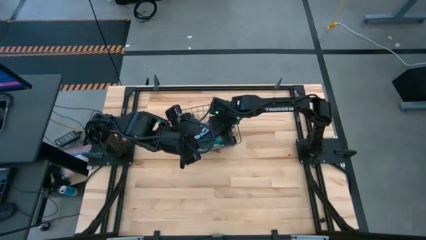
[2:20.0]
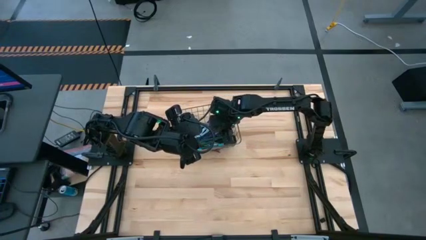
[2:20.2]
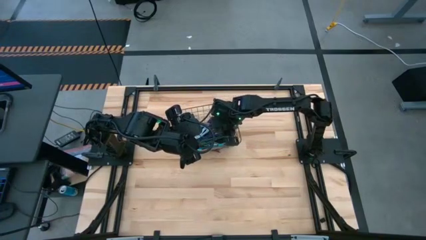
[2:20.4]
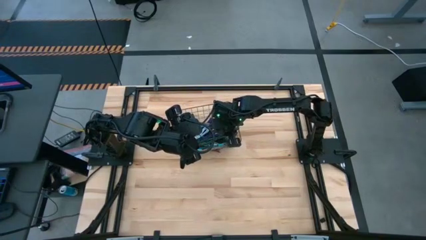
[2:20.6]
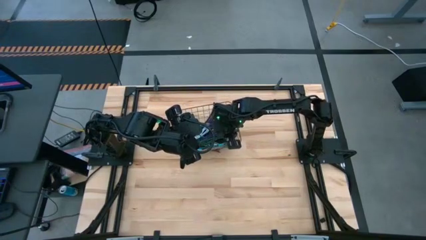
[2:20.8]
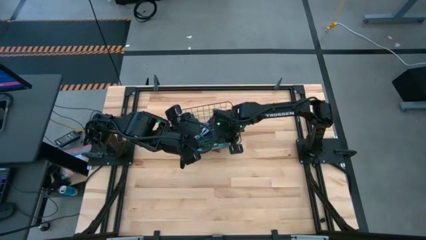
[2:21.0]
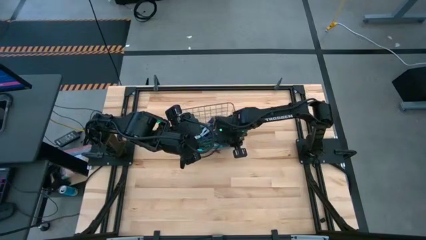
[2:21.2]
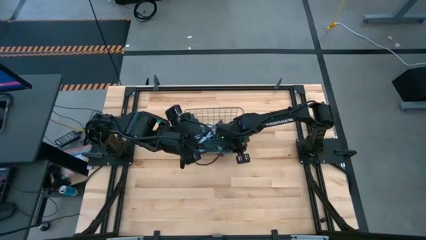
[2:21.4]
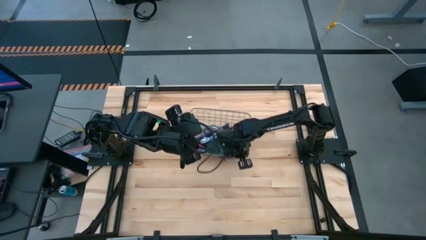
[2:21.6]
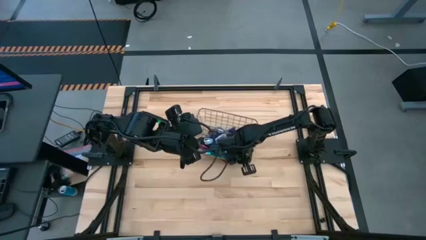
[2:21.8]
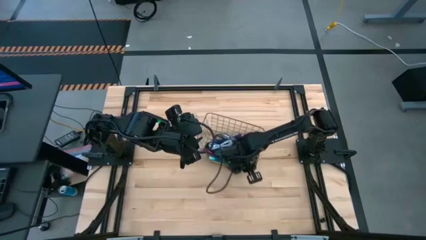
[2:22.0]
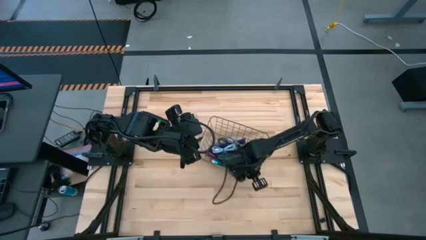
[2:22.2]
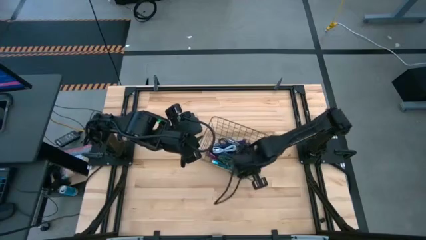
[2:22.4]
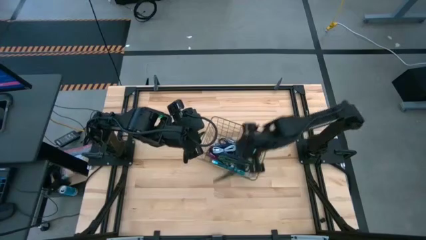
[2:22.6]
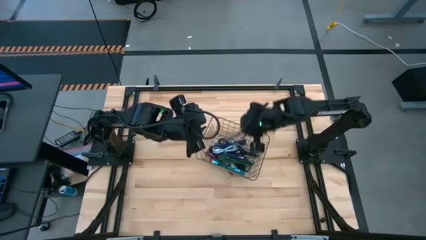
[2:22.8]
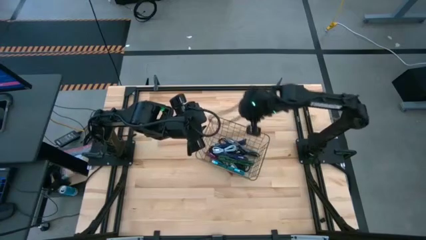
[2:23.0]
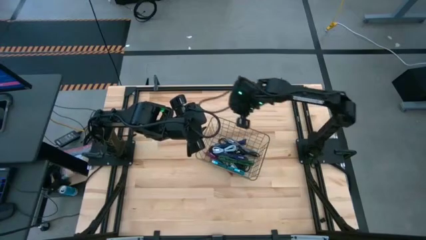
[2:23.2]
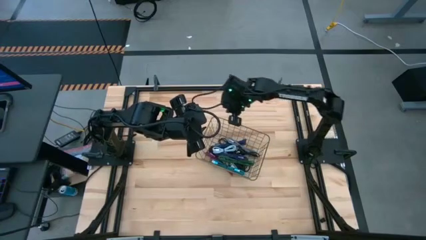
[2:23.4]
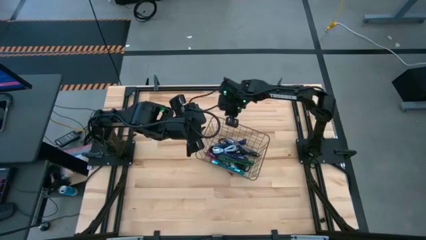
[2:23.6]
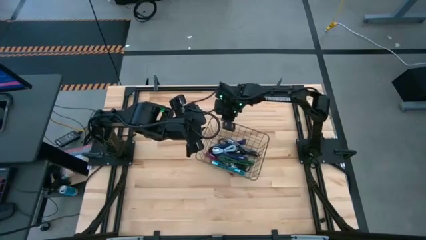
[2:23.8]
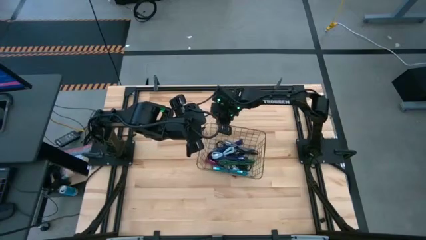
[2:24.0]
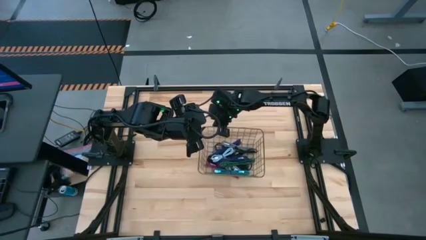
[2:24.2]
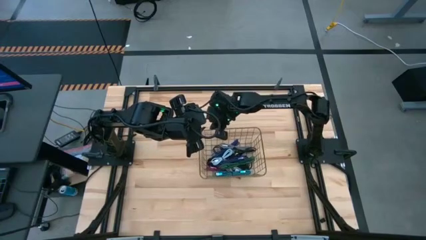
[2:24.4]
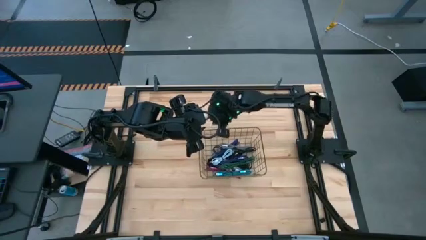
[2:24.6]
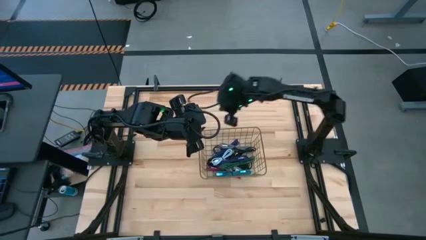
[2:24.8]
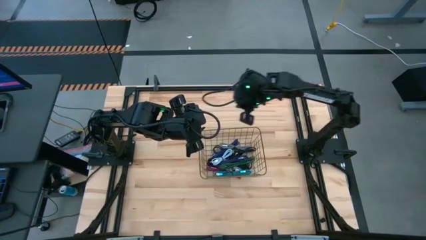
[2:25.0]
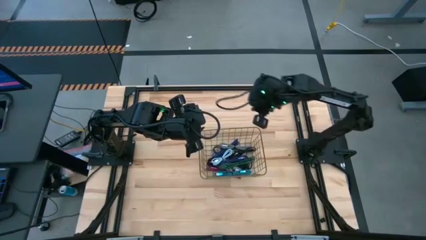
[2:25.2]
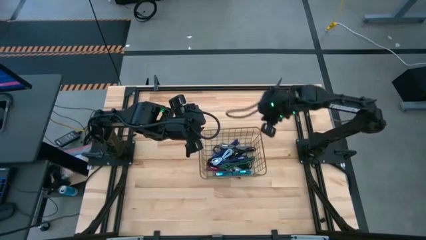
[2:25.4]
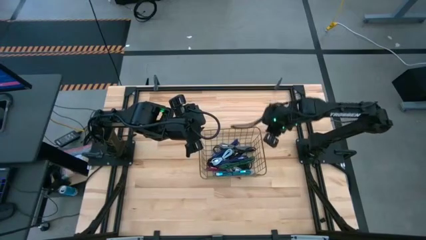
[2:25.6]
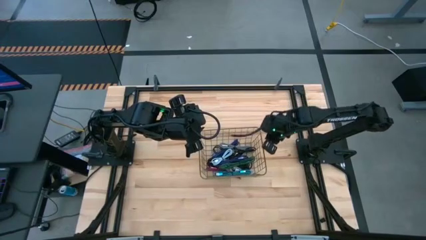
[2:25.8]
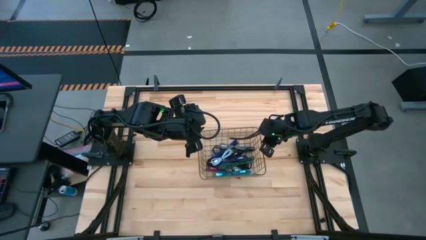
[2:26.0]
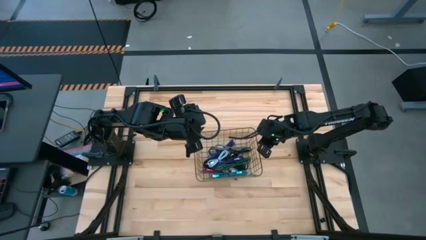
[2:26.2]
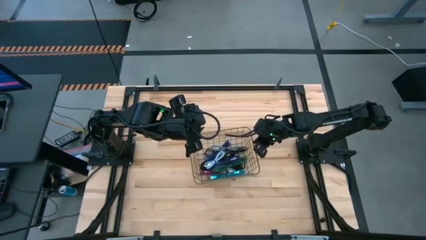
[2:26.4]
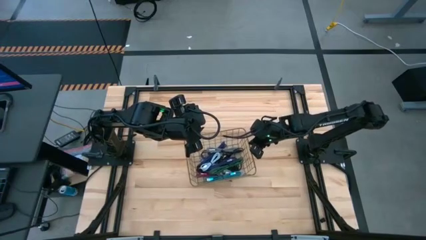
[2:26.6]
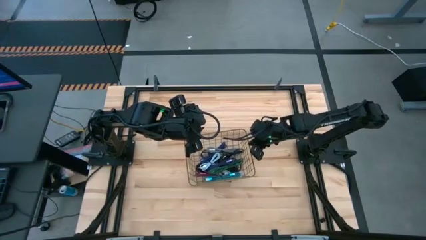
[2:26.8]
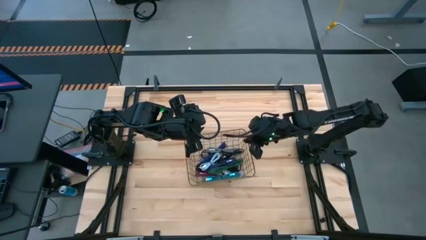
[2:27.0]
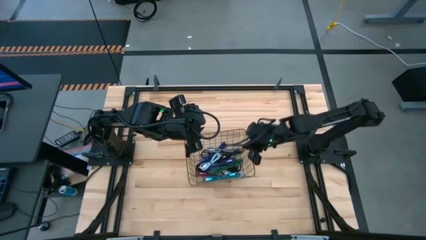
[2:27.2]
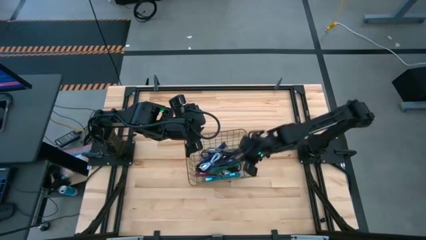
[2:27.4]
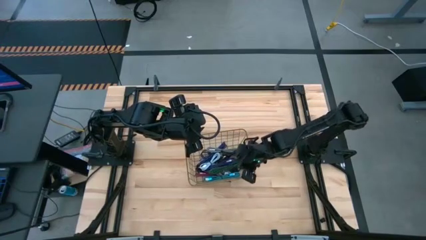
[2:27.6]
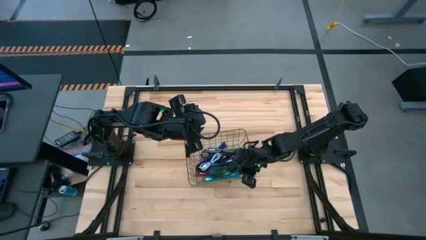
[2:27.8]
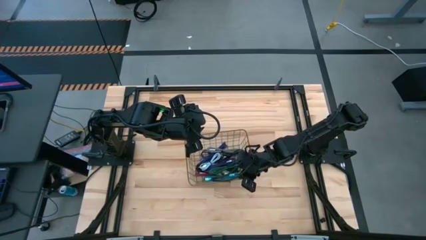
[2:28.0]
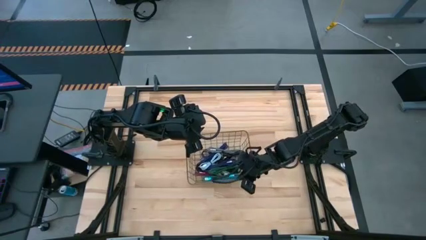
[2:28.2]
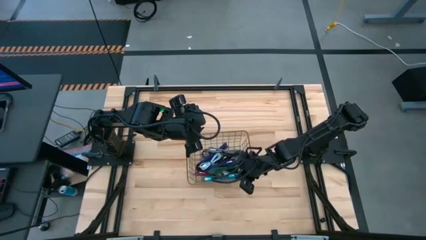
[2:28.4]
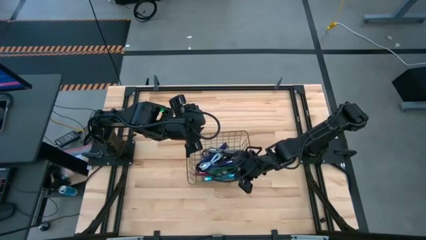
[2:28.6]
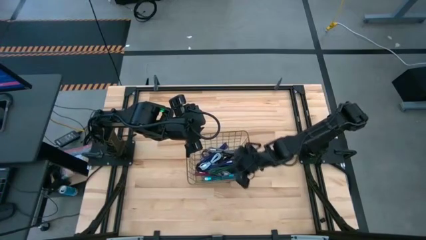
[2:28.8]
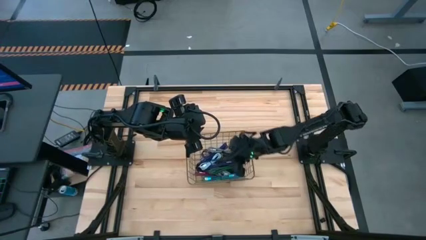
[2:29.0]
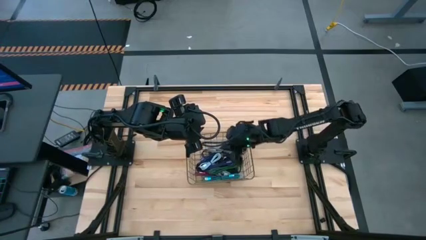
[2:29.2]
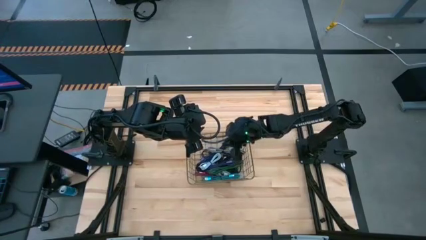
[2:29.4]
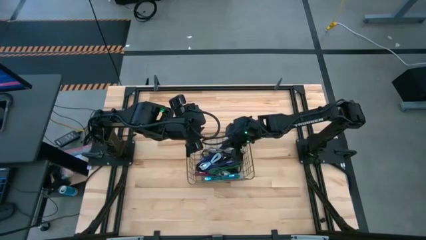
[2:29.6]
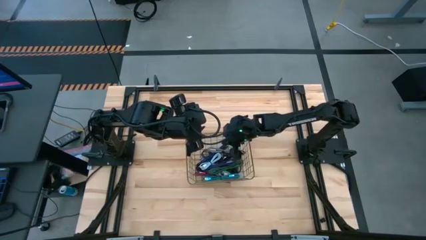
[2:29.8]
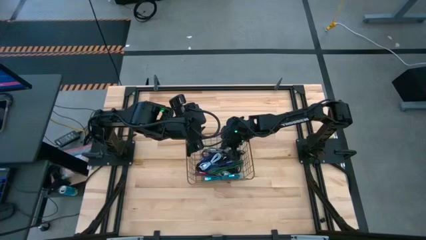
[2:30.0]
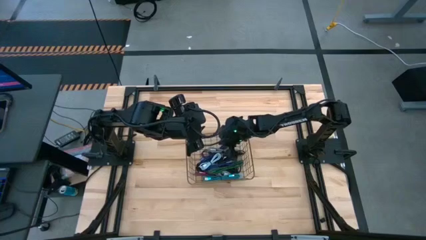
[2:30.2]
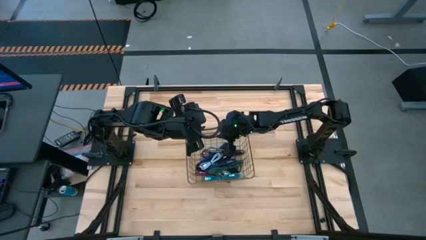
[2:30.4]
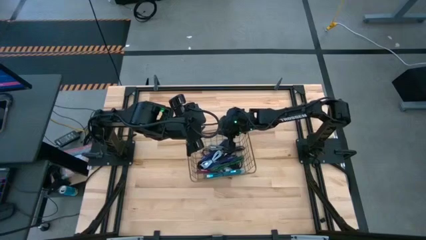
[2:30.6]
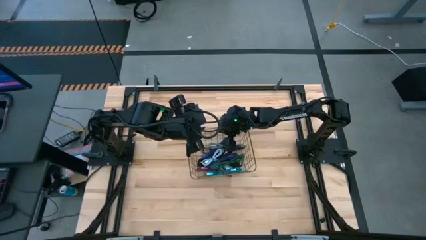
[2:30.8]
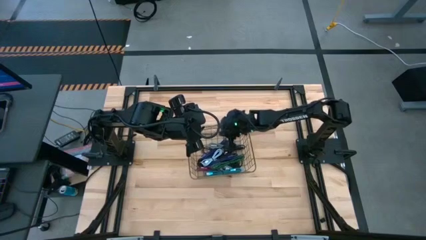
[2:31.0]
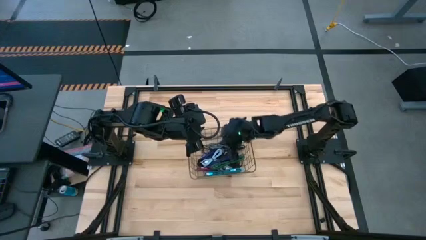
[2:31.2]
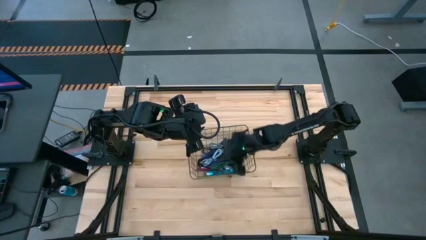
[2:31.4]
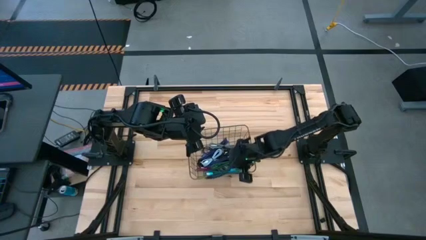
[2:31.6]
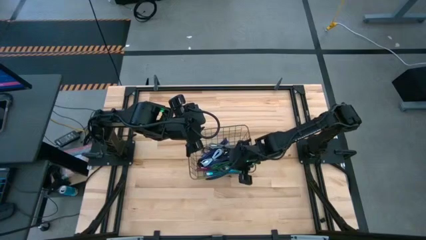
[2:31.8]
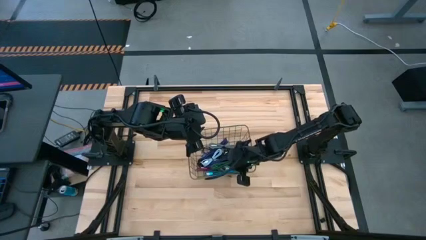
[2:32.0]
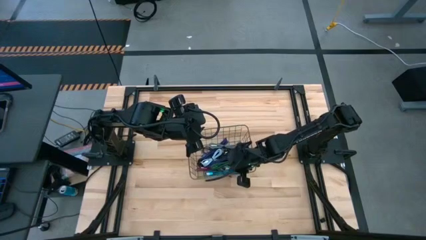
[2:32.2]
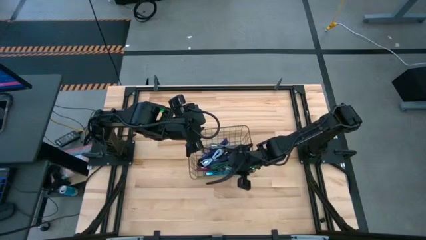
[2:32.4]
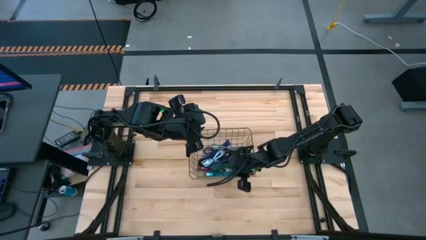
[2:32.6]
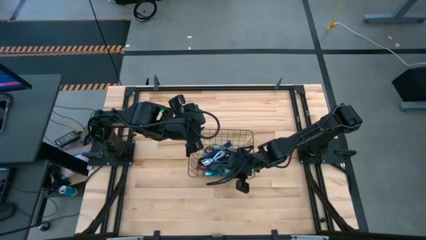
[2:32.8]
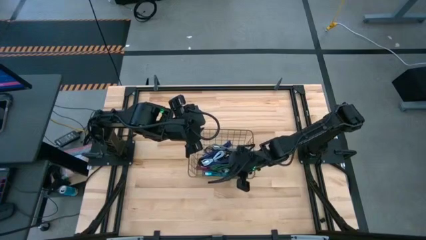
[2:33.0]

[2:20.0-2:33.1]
Task: Pick and place USB-C Cables
Adjust the gold wire basket

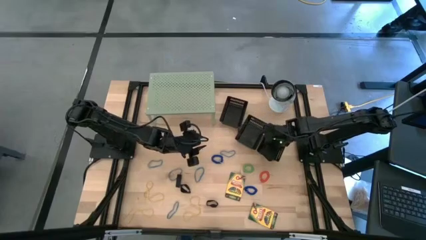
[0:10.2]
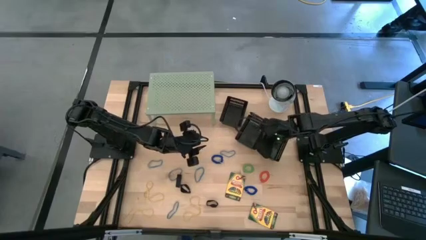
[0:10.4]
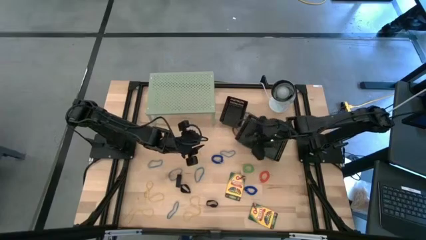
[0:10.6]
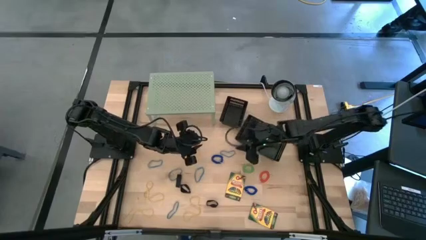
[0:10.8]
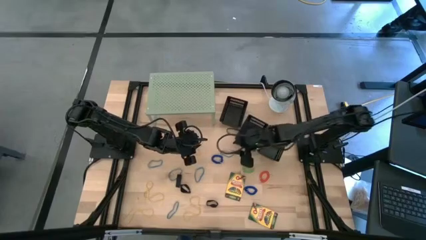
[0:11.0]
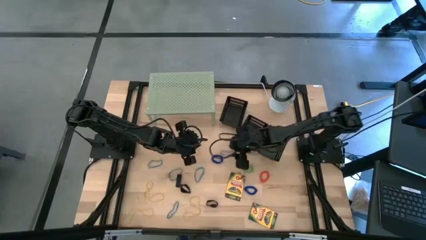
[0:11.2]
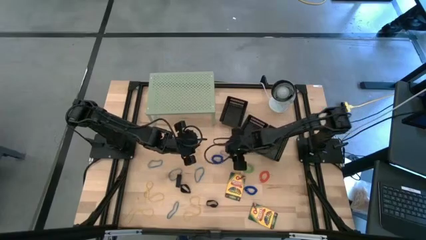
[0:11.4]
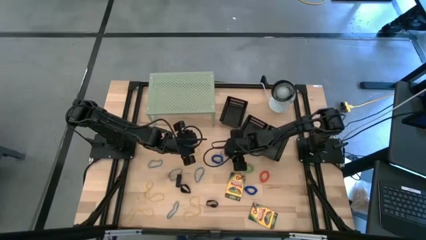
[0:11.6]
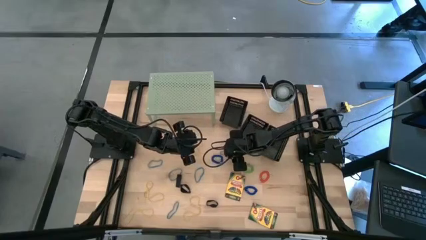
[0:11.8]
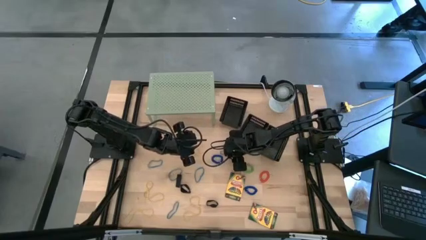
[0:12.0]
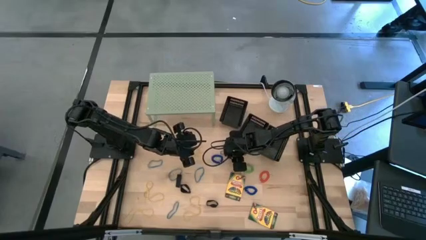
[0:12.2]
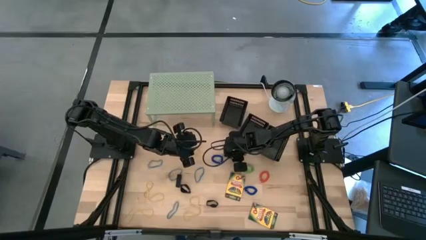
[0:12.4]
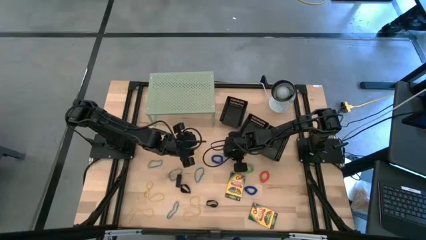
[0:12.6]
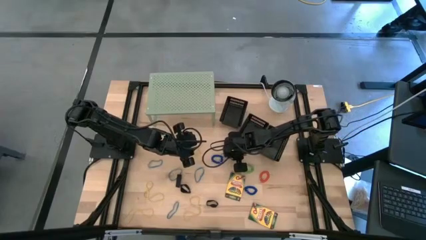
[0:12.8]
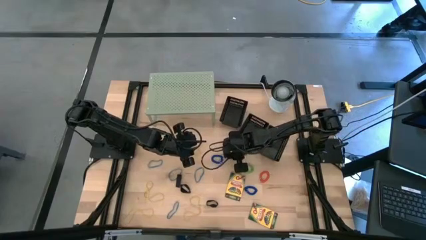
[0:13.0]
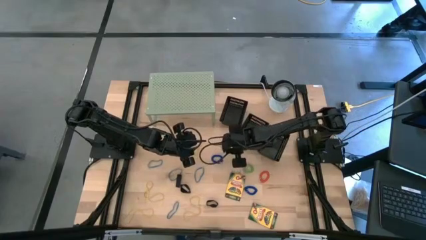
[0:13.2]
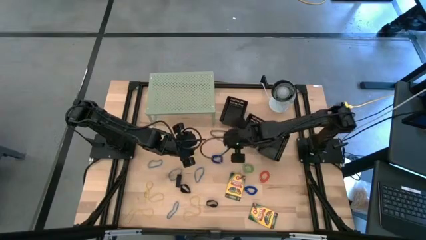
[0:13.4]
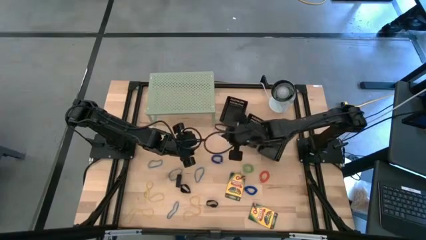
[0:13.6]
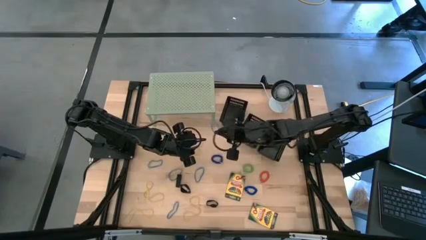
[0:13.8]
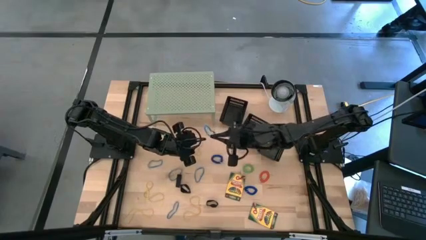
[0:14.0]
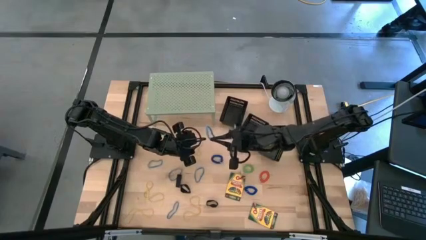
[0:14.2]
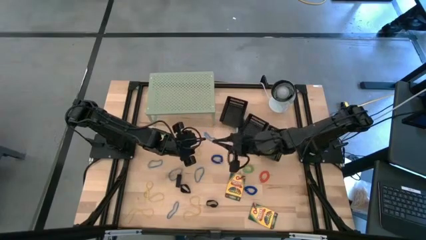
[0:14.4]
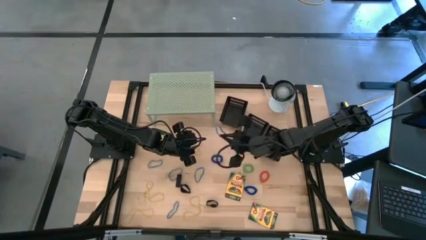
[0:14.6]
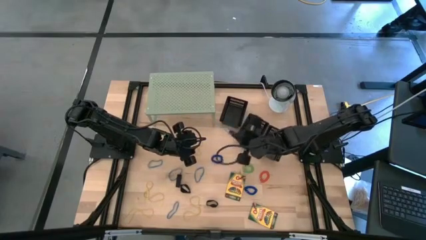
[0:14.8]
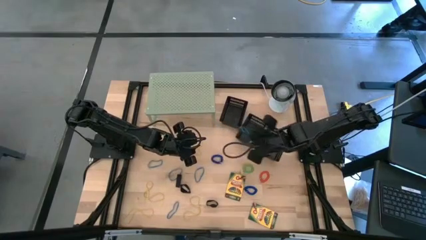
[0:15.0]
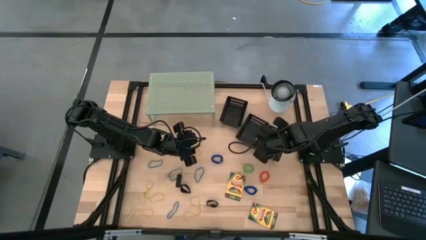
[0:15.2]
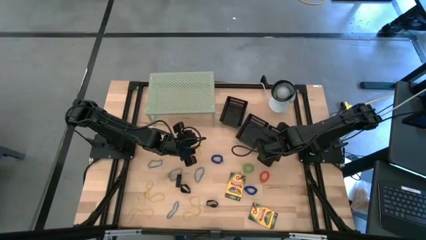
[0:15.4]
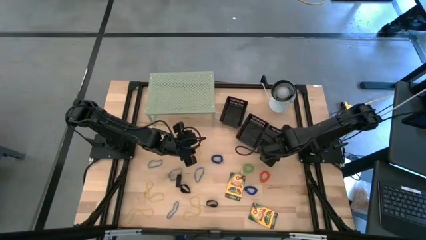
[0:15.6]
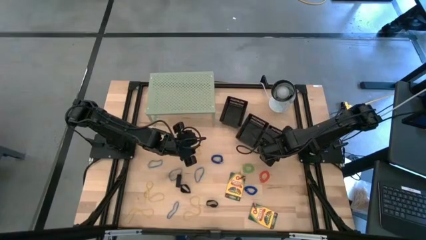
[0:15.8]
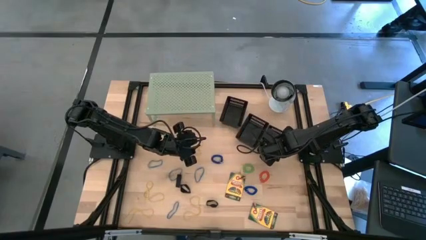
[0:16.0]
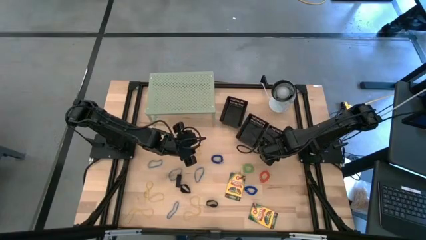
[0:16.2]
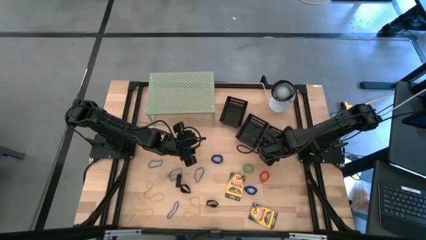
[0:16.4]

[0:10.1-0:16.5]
Task: Pick & Place Office Desk Supplies
Put the blue rubber band into the bottom black bin
